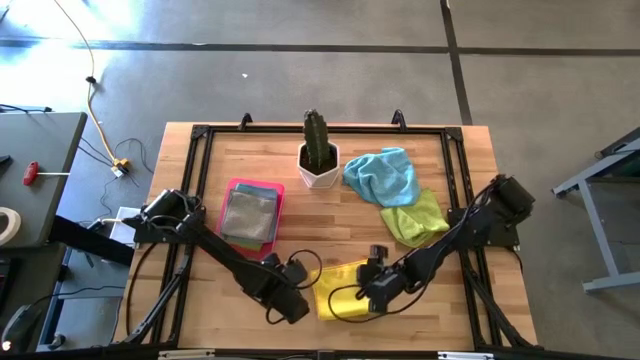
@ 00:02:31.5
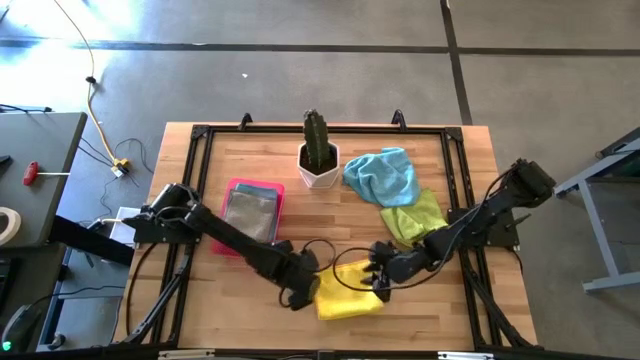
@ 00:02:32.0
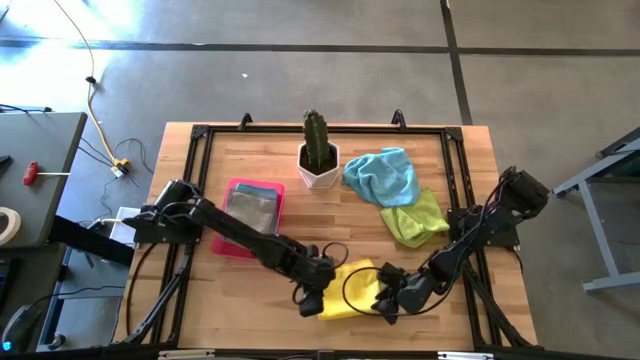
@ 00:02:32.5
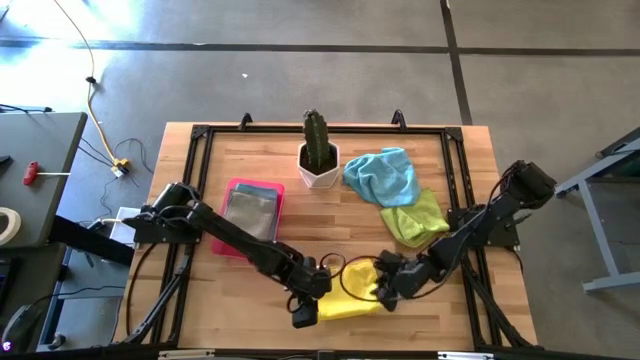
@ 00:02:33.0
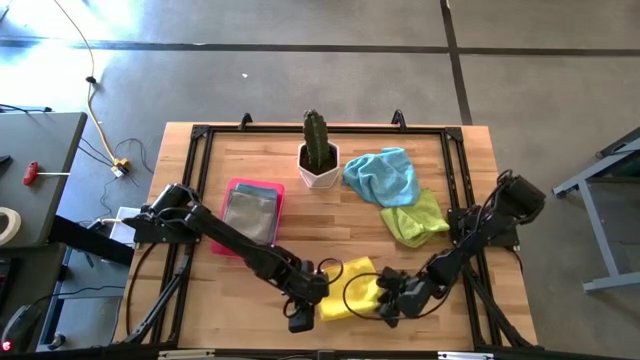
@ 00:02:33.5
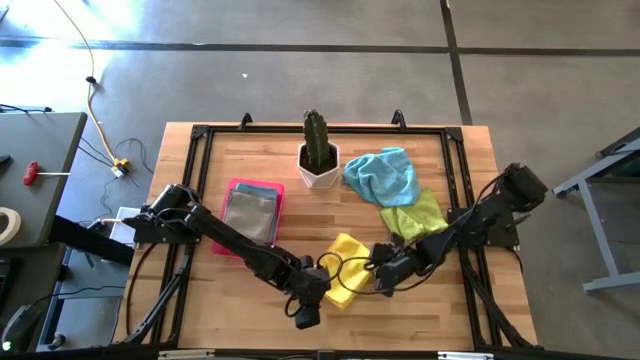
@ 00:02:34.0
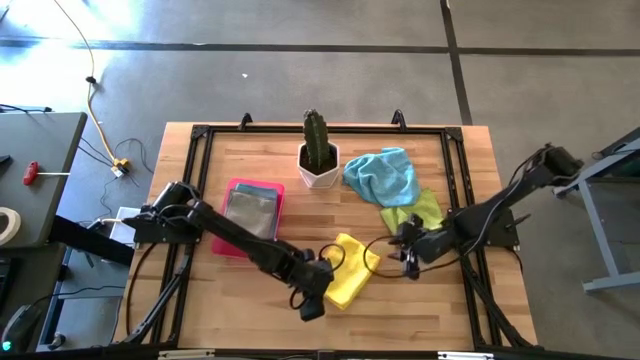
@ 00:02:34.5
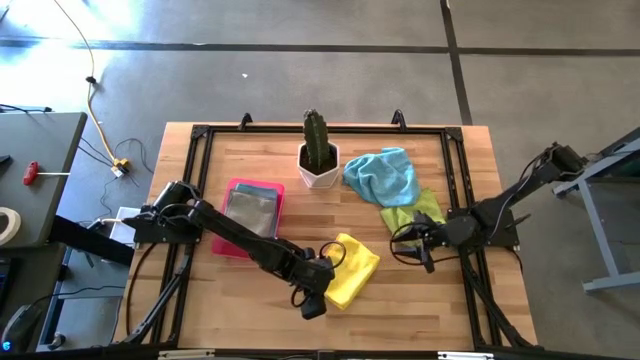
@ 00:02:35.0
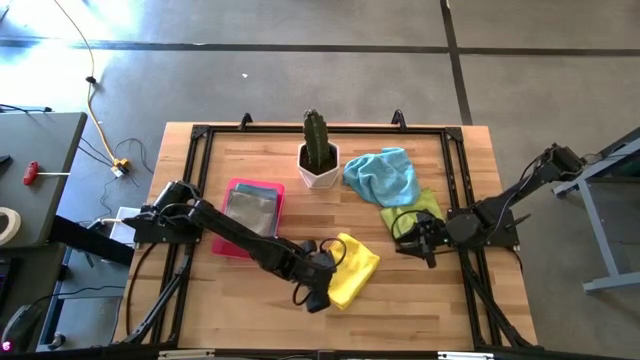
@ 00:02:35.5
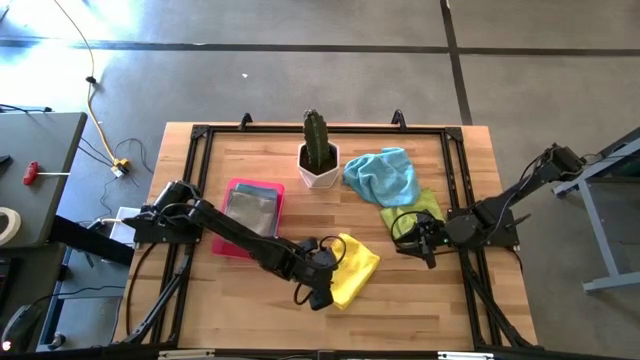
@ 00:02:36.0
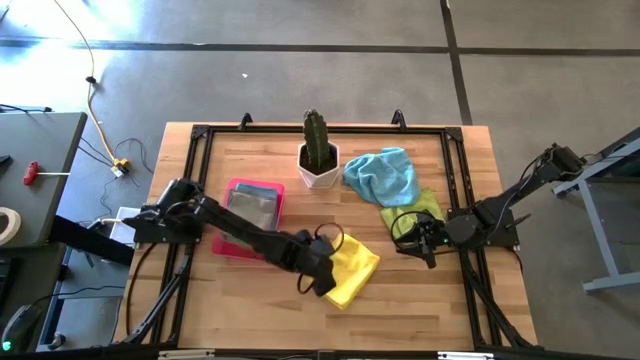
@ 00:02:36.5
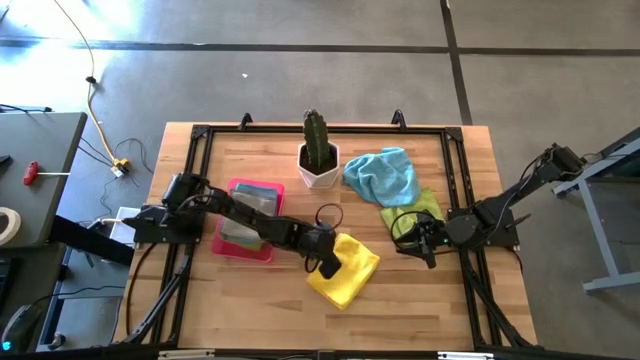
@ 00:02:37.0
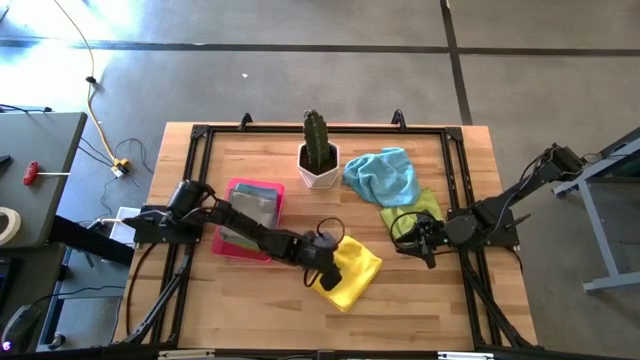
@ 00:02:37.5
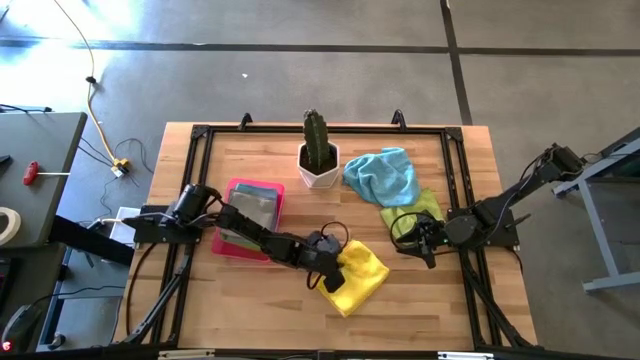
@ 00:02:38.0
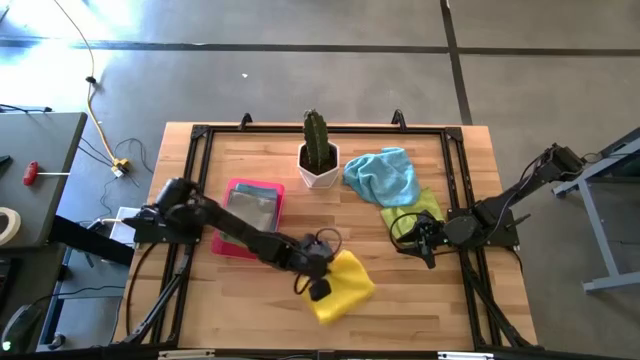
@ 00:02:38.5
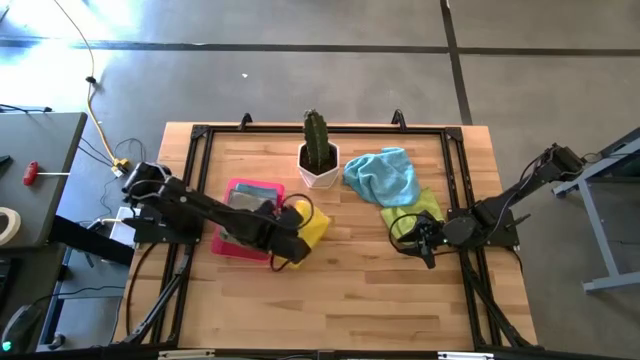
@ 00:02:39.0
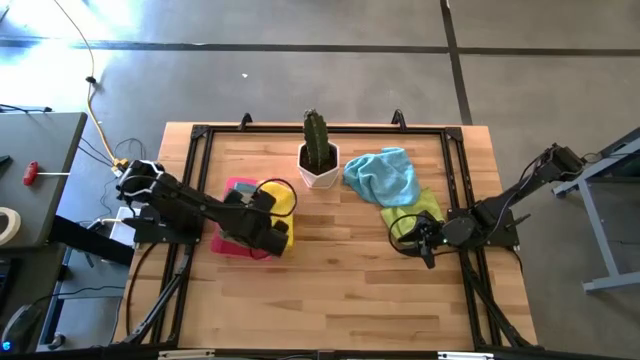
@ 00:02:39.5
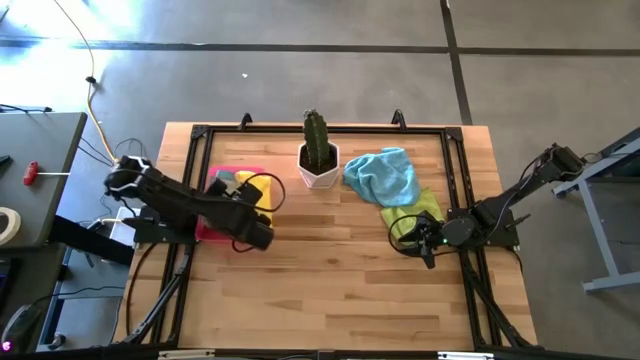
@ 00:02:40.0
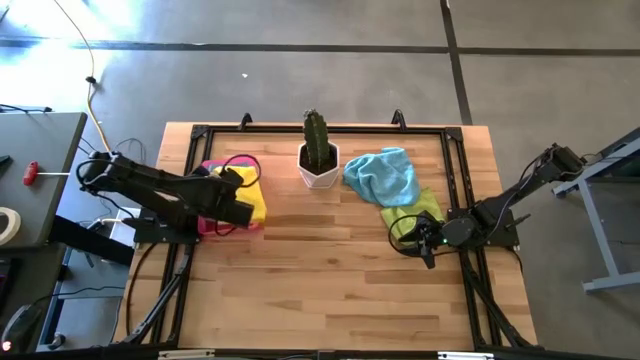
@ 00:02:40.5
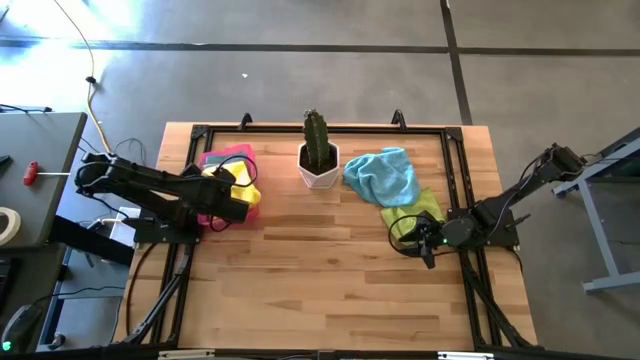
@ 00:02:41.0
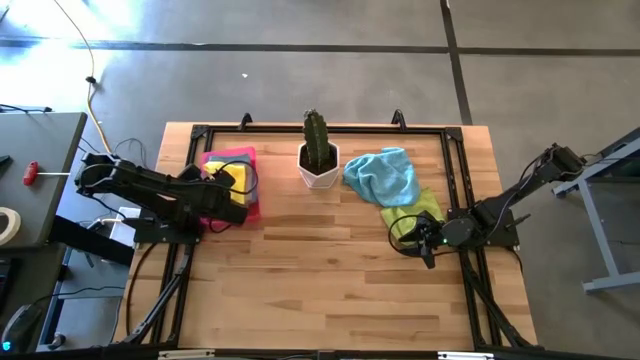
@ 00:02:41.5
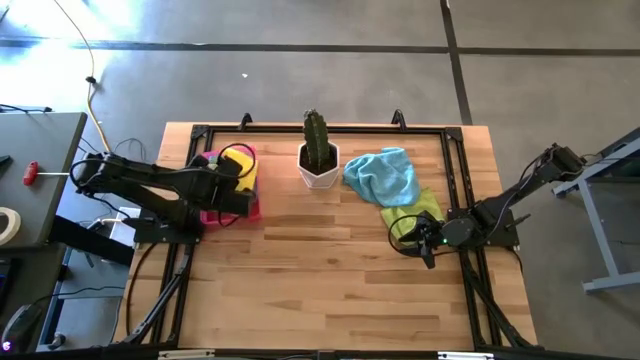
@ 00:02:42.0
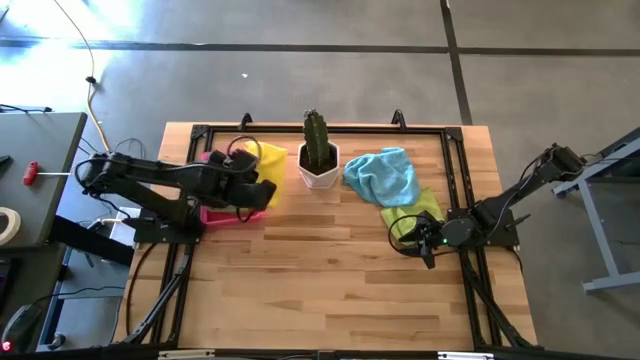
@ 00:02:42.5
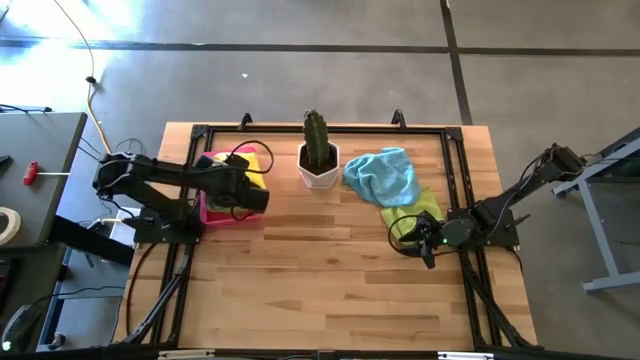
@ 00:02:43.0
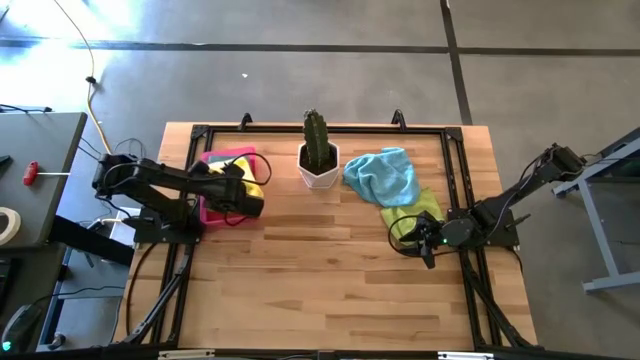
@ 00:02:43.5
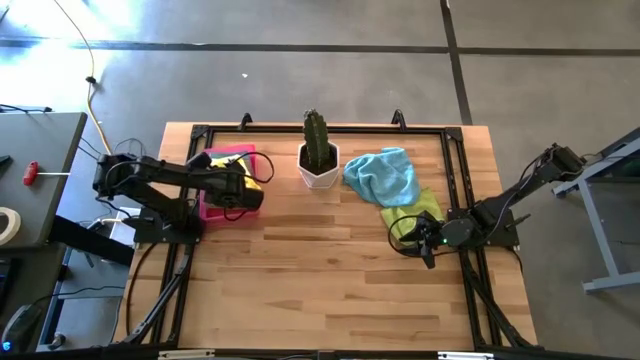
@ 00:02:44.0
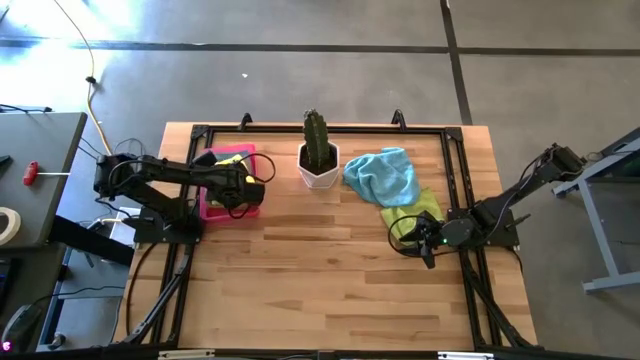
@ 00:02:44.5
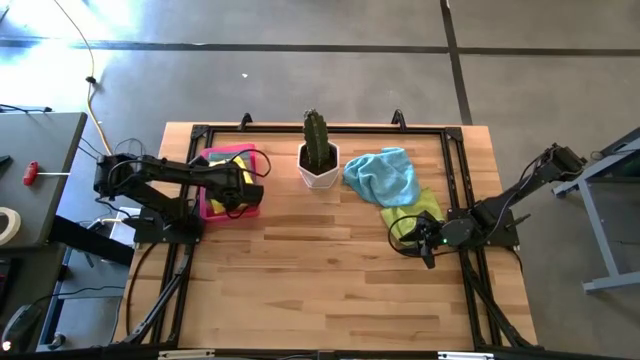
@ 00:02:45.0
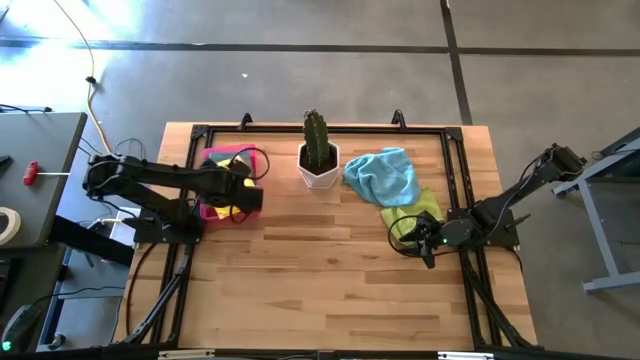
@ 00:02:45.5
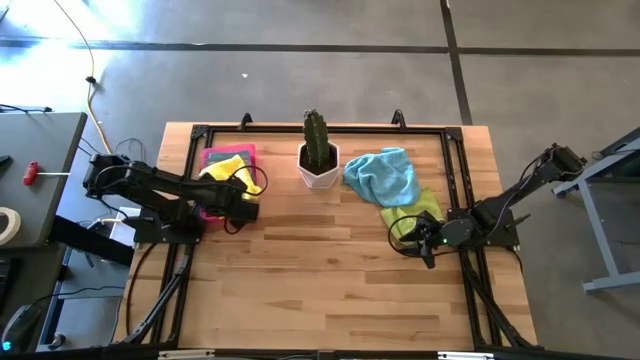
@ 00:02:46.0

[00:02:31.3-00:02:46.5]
Task: Fold microfiber towels
Put the yellow towel in the pink bin

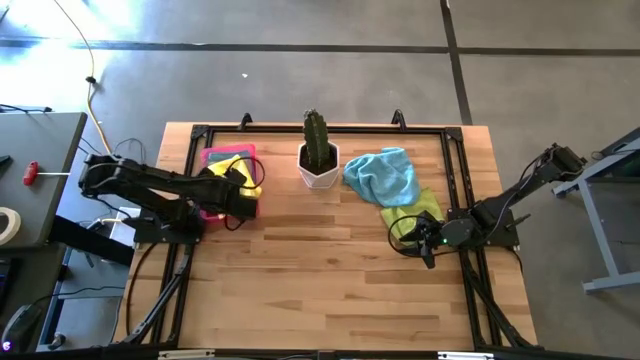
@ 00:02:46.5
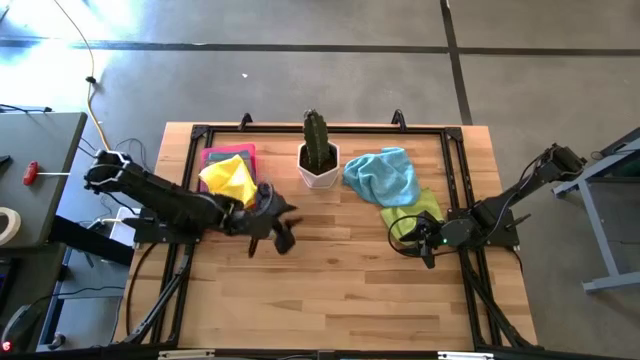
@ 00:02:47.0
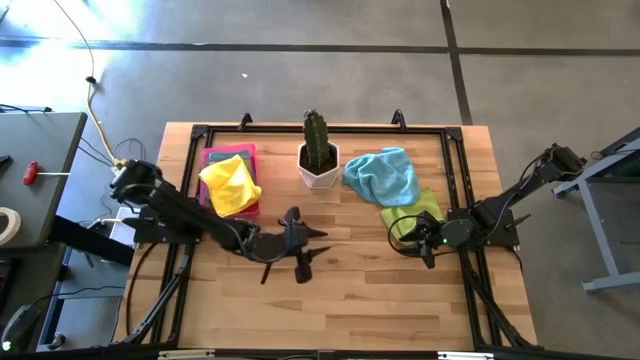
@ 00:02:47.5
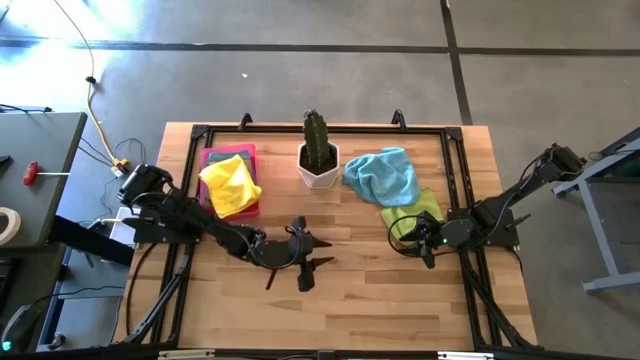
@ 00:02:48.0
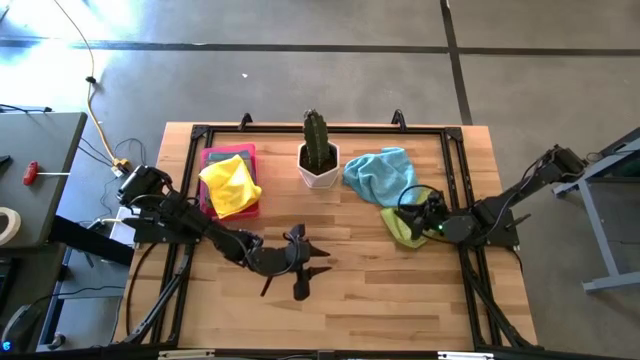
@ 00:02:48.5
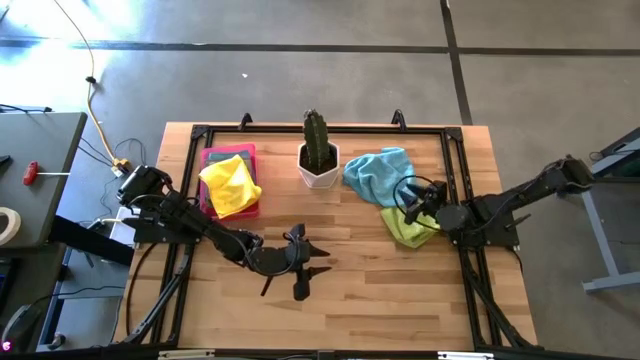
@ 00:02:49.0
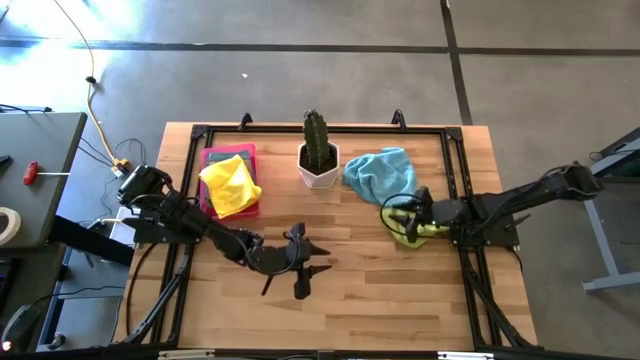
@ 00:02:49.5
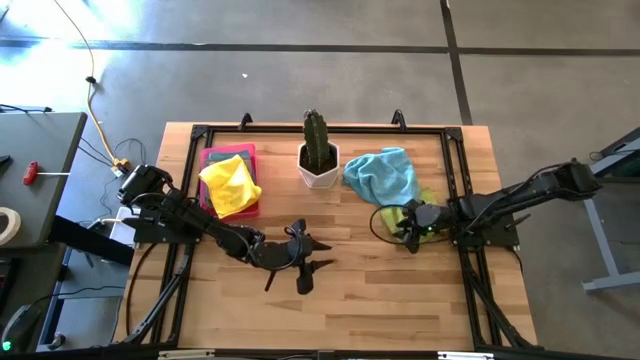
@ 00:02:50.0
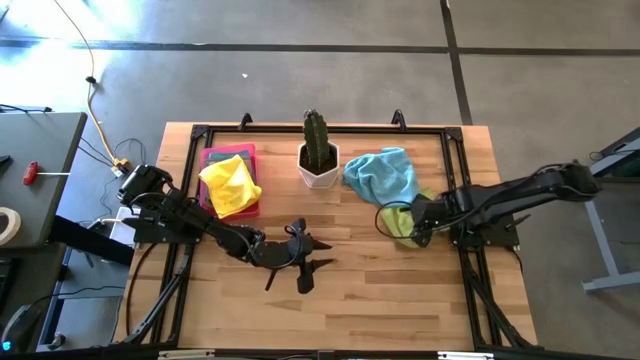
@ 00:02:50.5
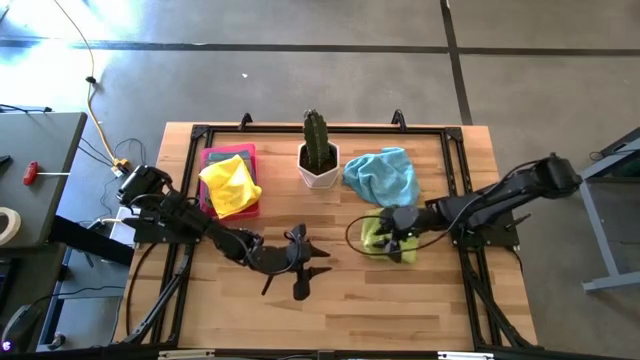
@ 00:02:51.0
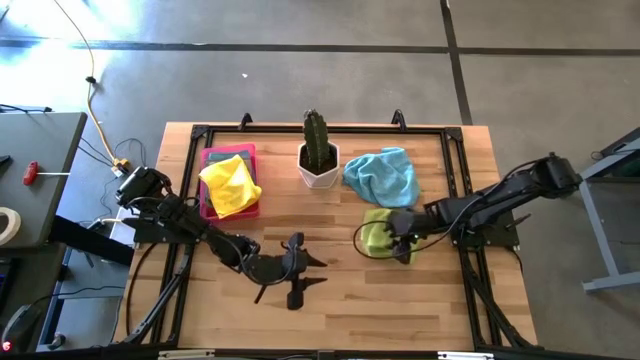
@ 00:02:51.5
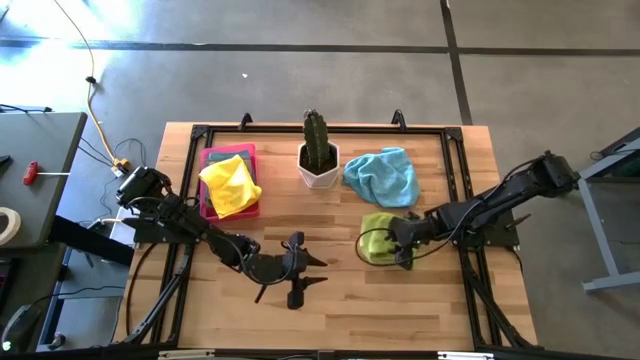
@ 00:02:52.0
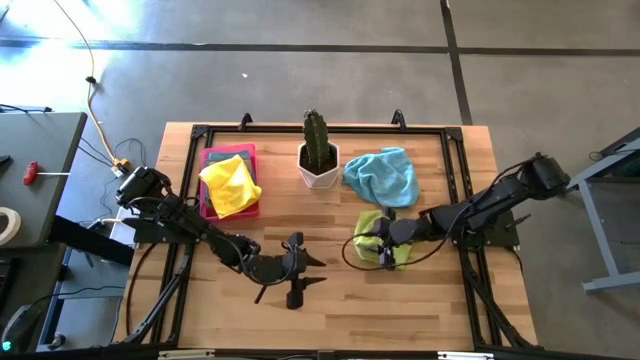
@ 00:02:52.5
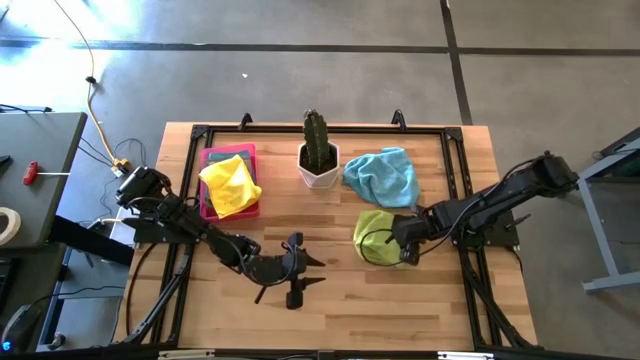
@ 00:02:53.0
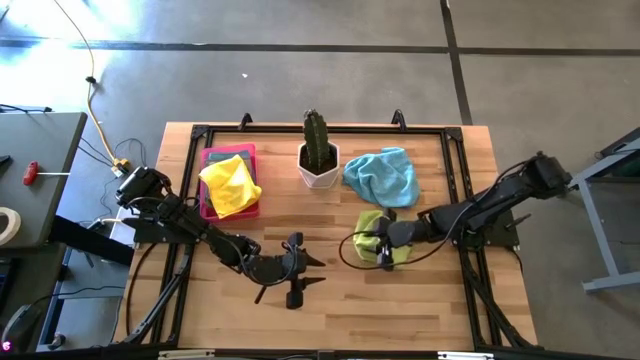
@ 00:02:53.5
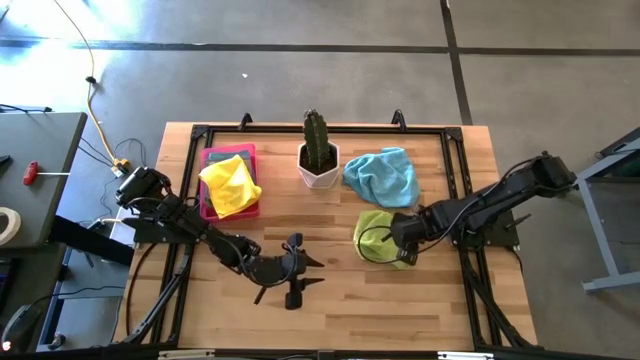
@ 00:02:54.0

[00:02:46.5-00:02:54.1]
Fold the light green towel
